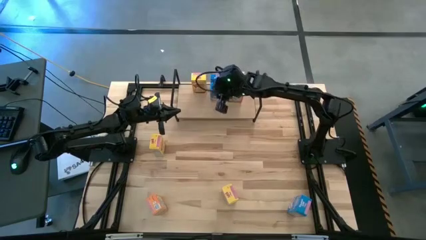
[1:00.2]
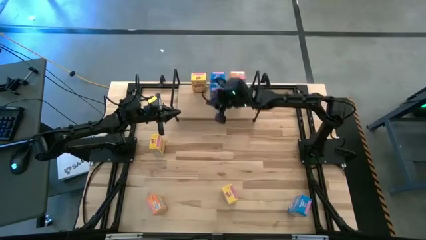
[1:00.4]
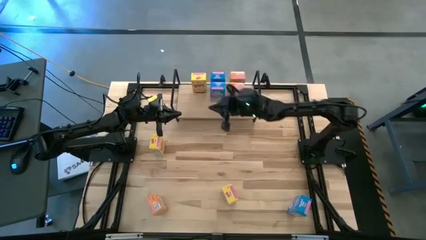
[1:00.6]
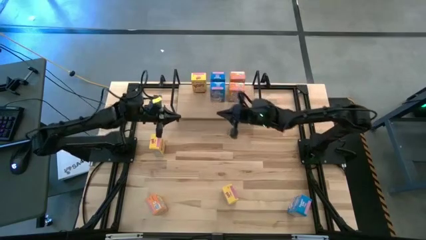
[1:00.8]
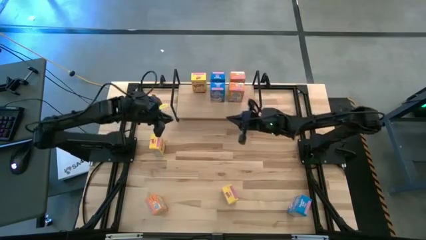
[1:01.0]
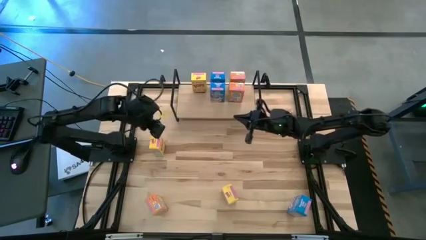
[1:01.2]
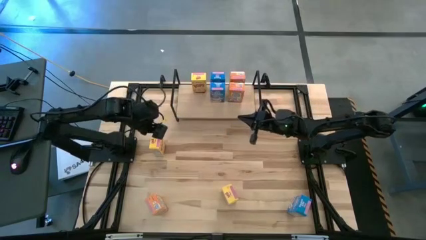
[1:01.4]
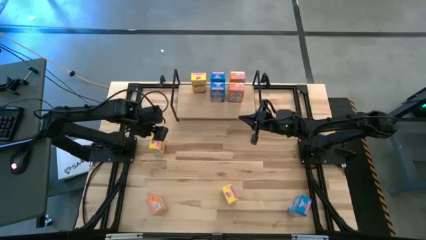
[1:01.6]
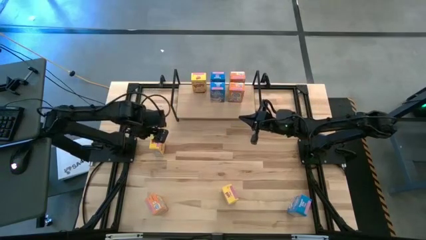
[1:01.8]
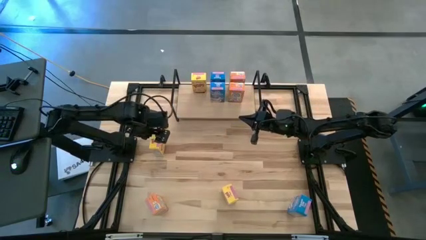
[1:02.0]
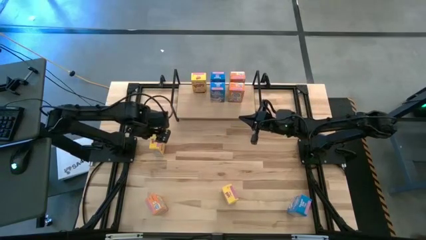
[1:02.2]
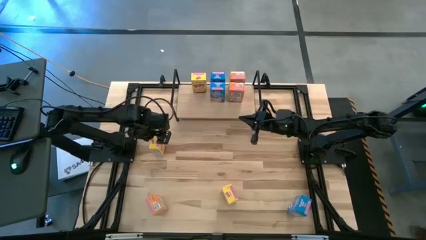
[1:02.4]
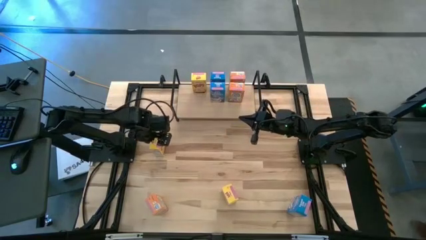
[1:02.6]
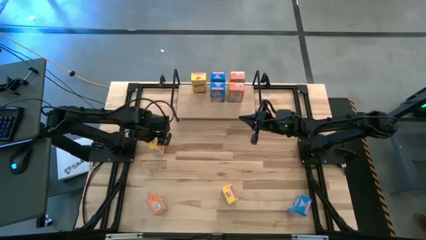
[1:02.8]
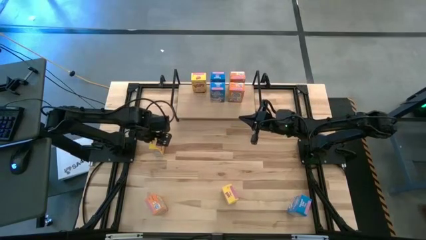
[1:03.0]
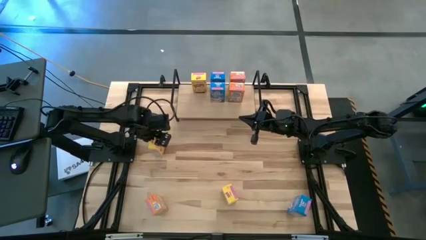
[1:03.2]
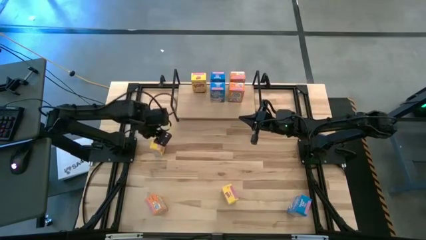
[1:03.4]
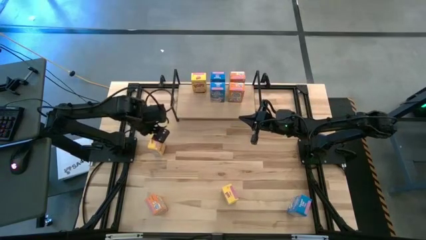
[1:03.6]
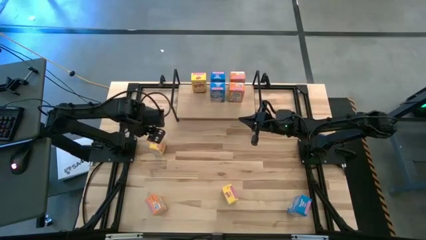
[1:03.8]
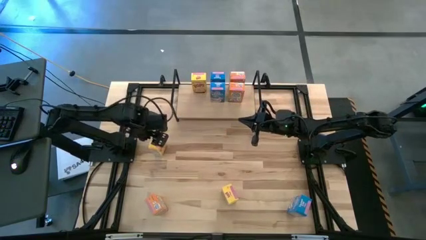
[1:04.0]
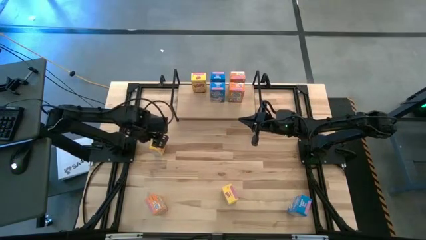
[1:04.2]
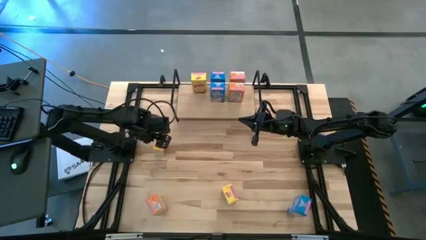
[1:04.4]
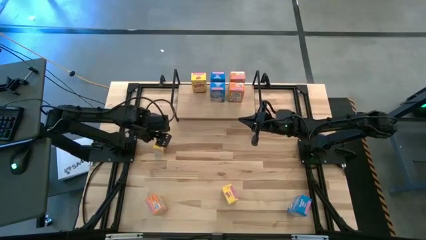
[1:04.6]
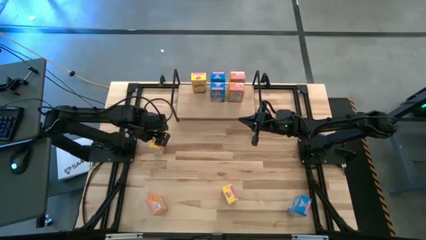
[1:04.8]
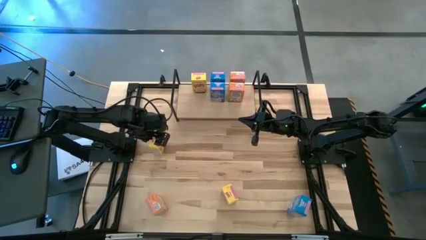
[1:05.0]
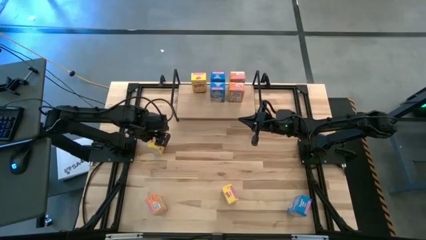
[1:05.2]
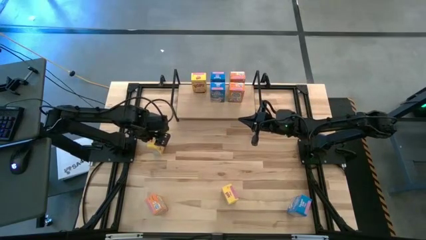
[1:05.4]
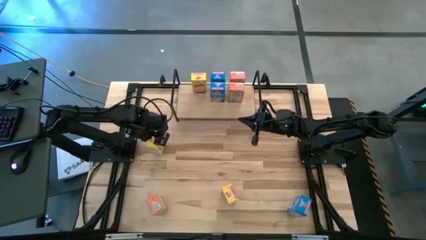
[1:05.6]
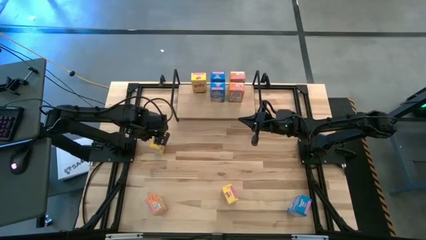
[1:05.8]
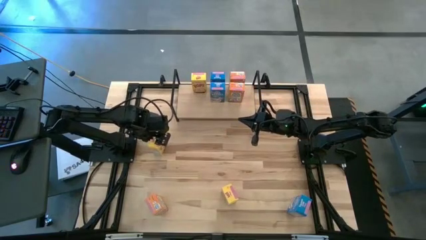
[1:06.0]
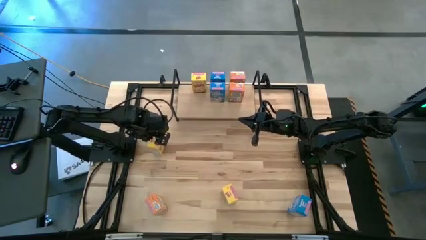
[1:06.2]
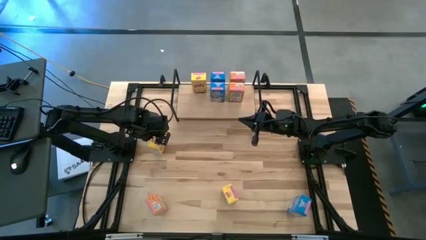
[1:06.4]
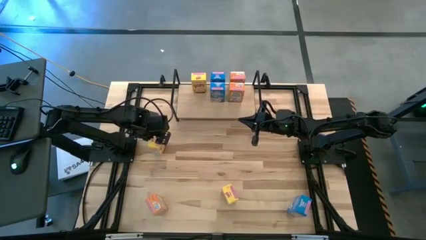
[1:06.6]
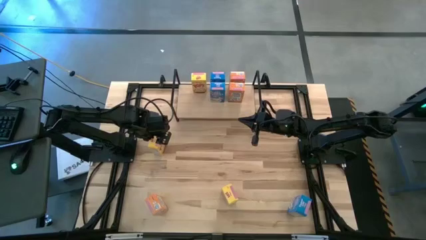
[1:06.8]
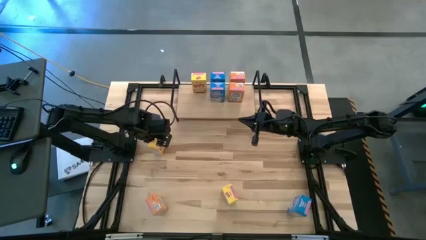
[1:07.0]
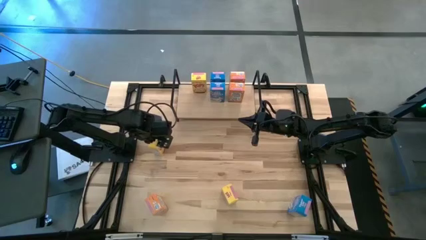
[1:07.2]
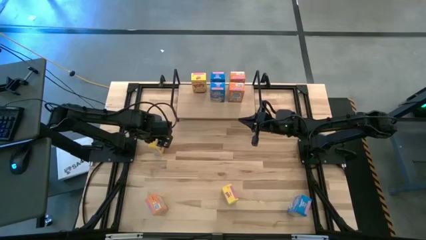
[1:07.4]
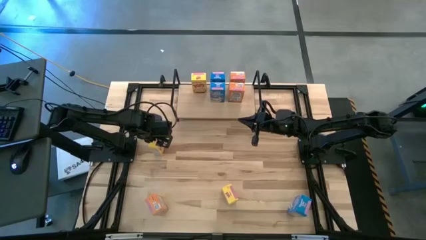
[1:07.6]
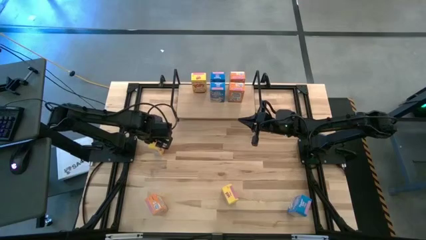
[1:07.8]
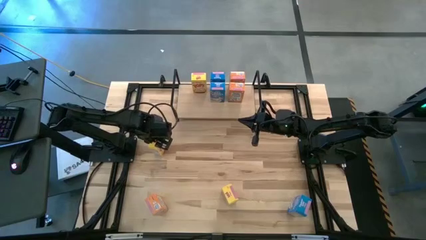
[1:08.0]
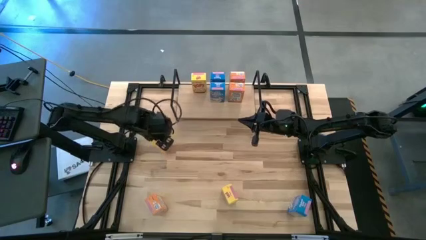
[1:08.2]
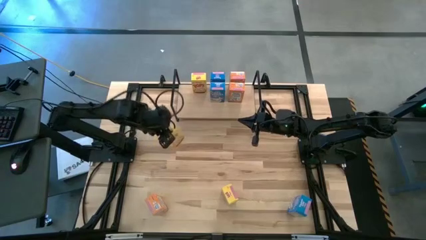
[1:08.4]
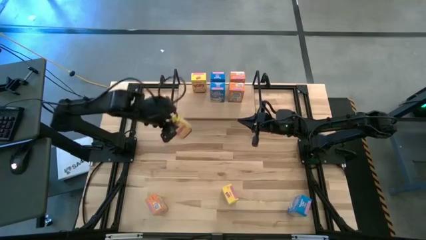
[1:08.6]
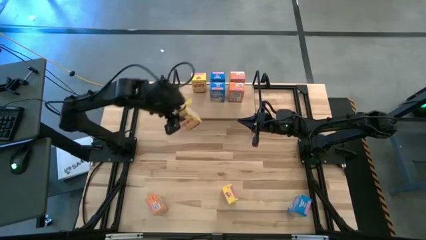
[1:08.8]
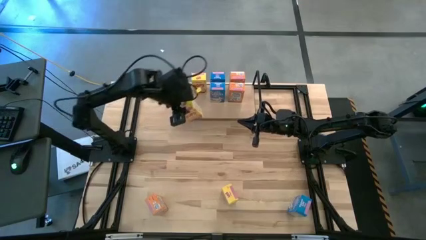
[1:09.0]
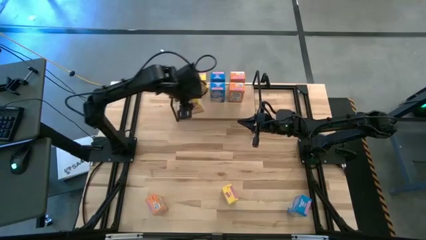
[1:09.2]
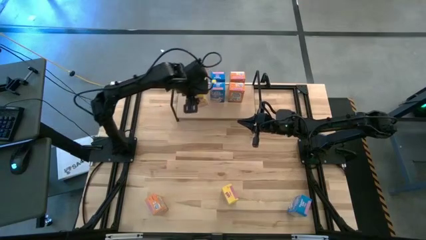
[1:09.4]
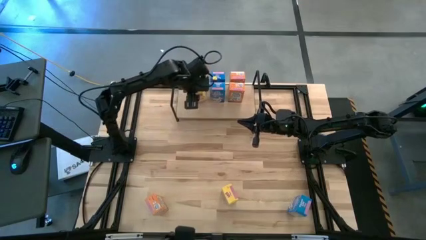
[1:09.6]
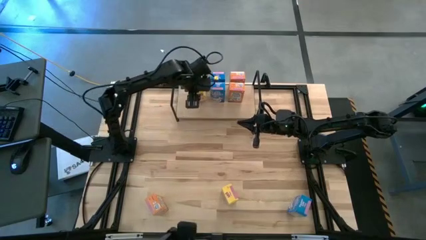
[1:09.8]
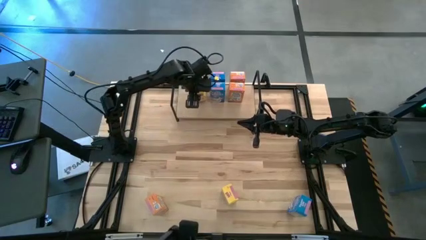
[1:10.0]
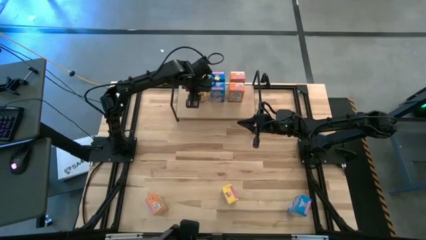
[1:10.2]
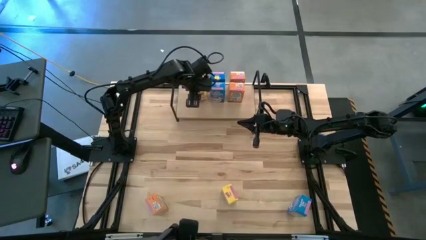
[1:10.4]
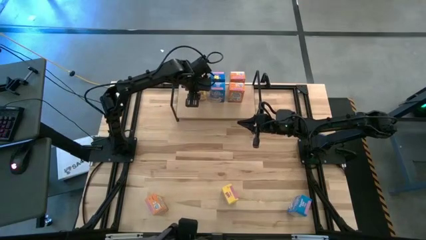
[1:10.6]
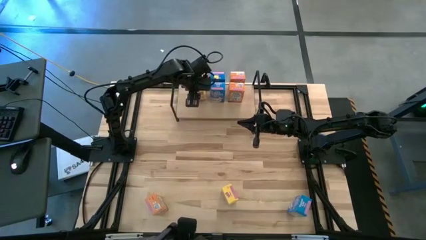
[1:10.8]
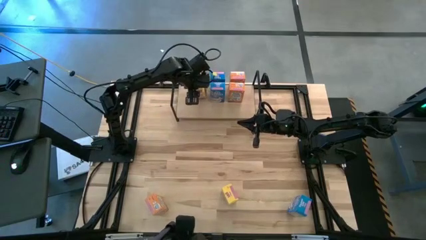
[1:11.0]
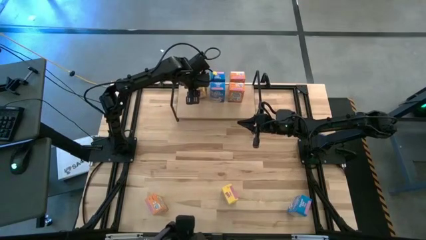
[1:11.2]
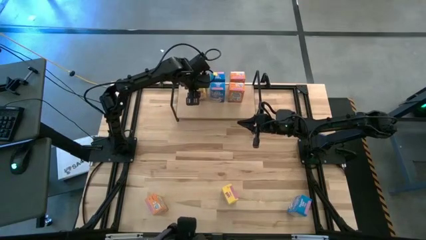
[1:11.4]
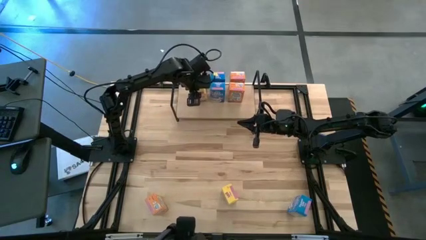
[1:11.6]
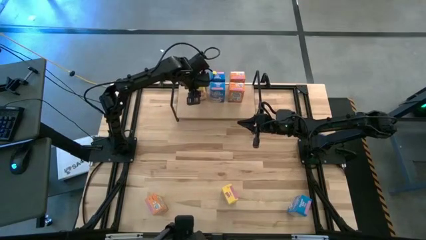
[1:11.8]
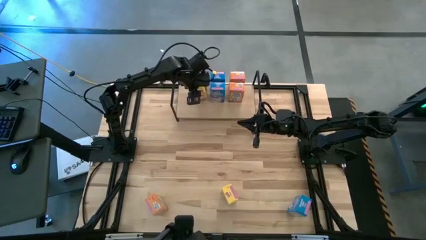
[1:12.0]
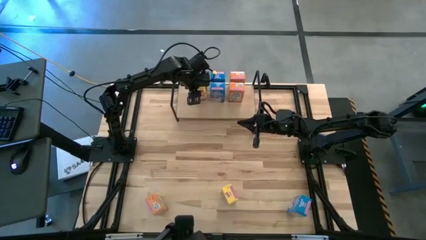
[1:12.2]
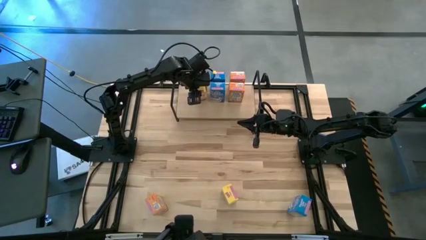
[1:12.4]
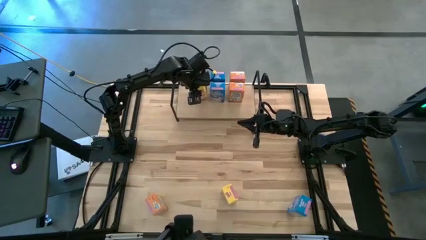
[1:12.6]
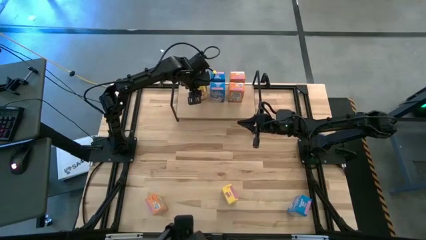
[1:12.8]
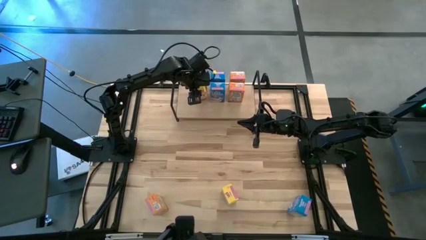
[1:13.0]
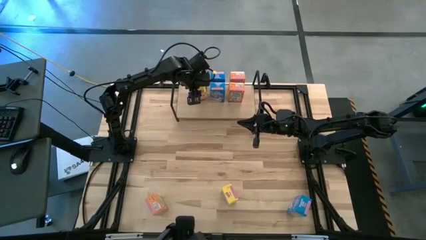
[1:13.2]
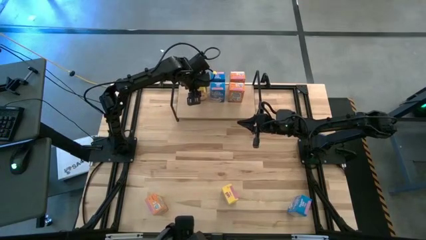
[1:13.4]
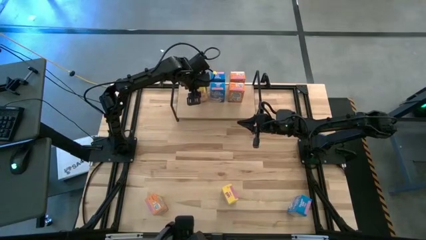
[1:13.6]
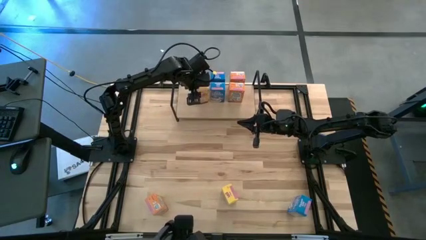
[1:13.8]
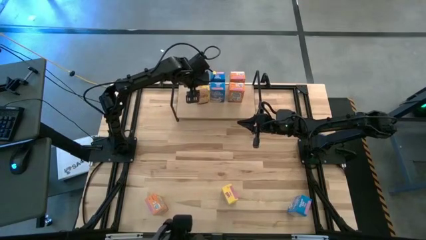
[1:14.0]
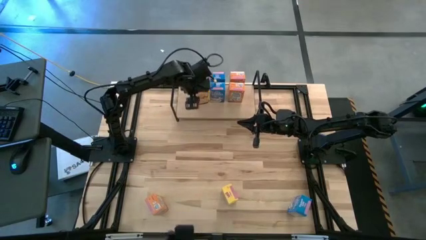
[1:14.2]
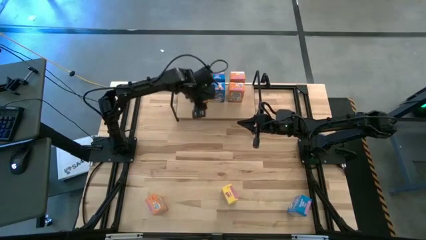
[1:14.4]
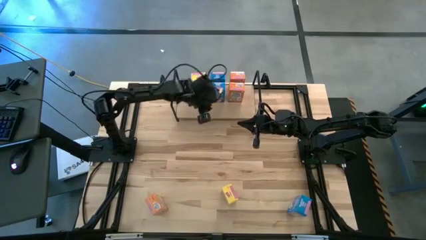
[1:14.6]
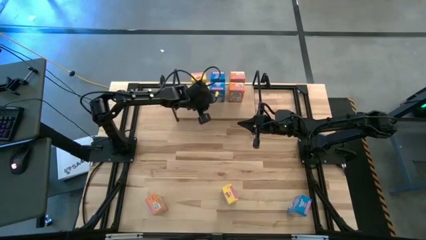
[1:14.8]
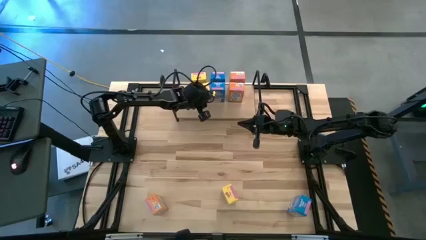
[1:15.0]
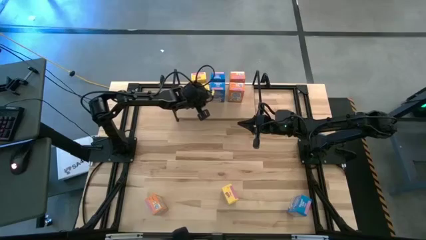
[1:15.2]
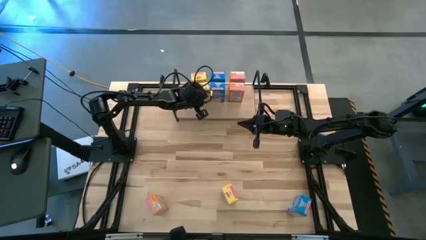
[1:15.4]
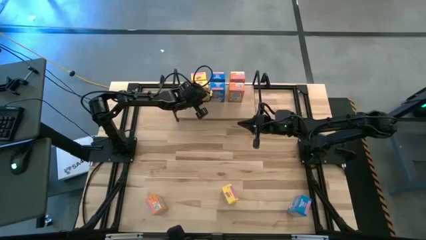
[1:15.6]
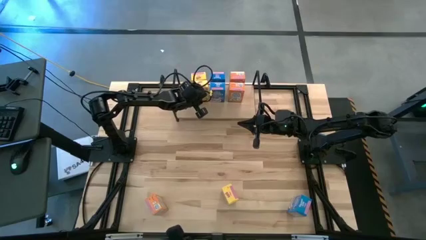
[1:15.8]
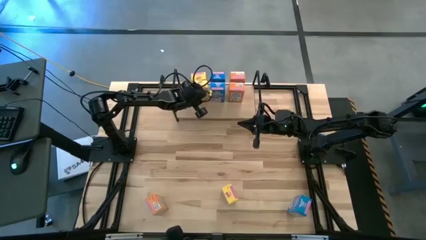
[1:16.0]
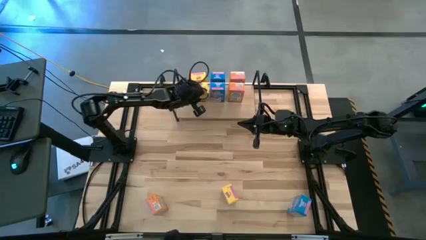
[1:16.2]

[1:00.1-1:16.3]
Task: Stack cereal on shelf
Put the top yellow cereal box on the shelf aligned with the other yellow cereal box
